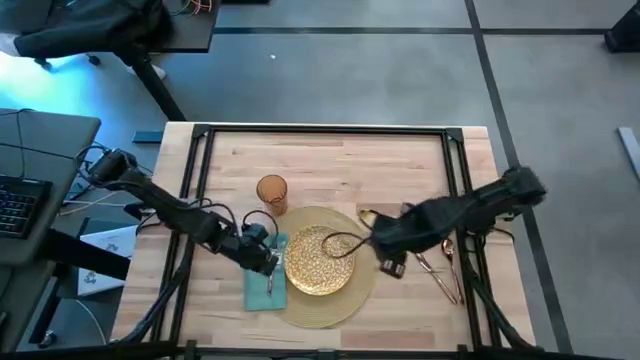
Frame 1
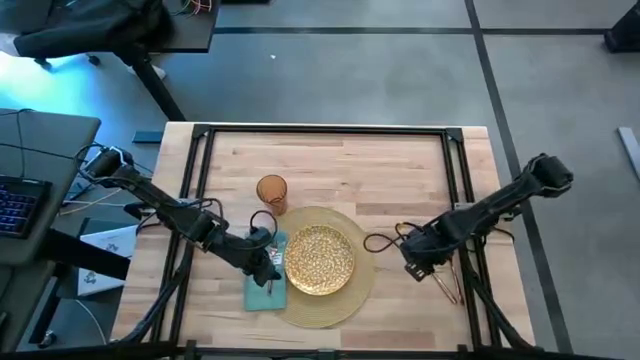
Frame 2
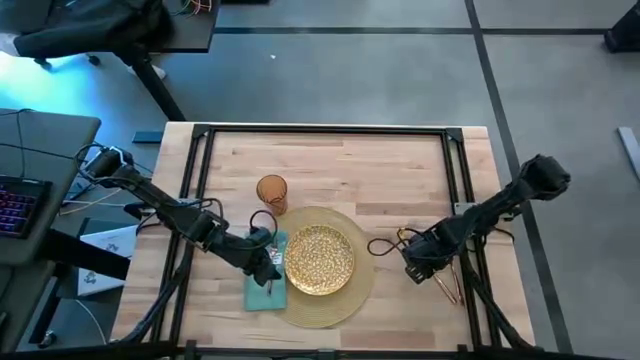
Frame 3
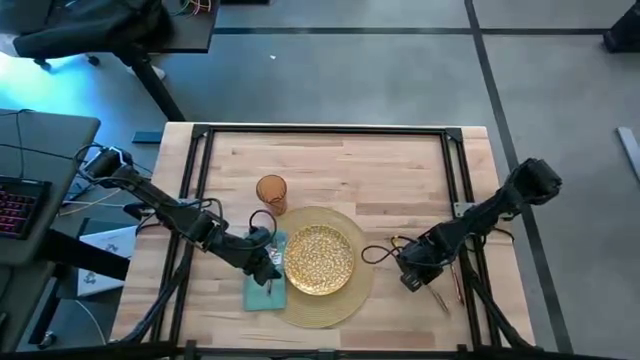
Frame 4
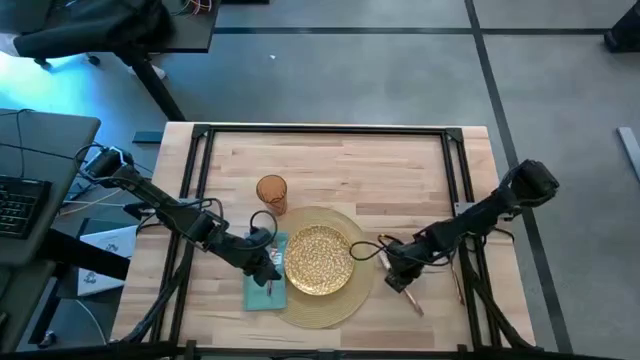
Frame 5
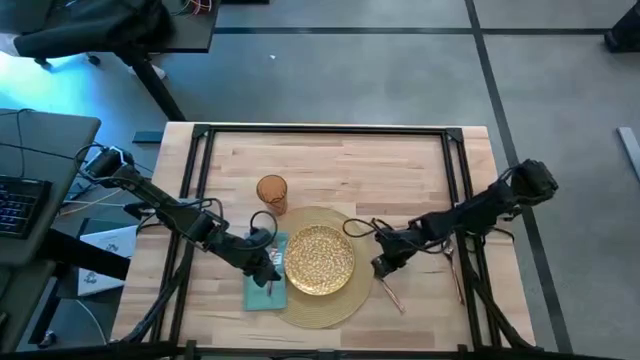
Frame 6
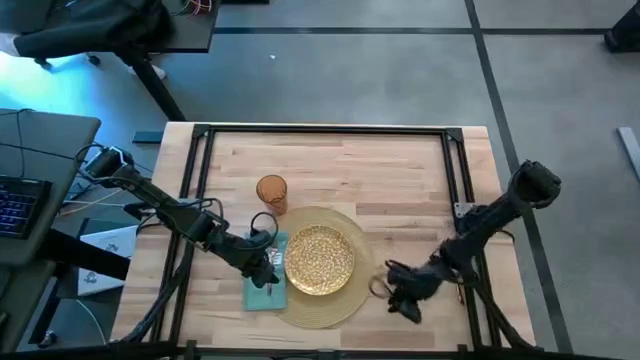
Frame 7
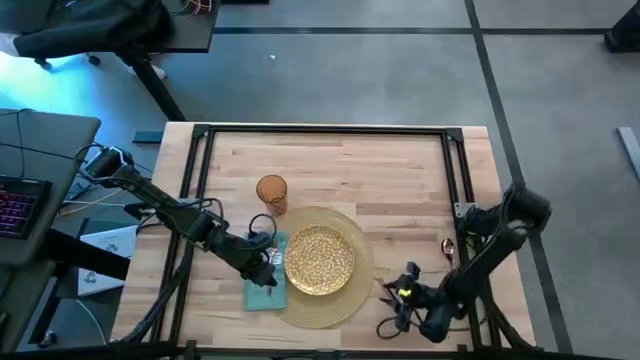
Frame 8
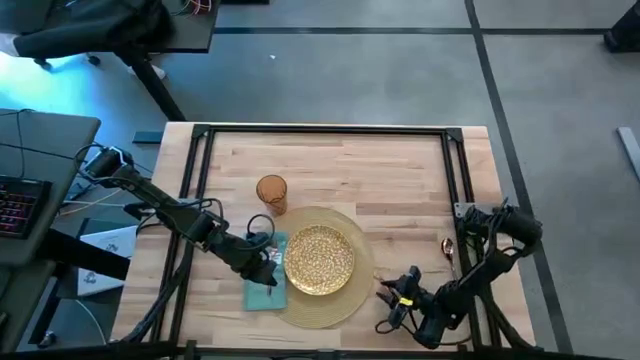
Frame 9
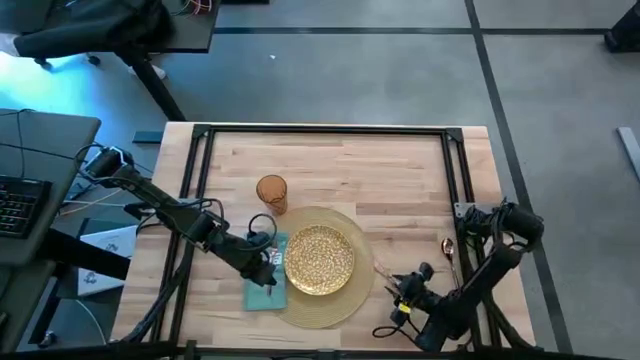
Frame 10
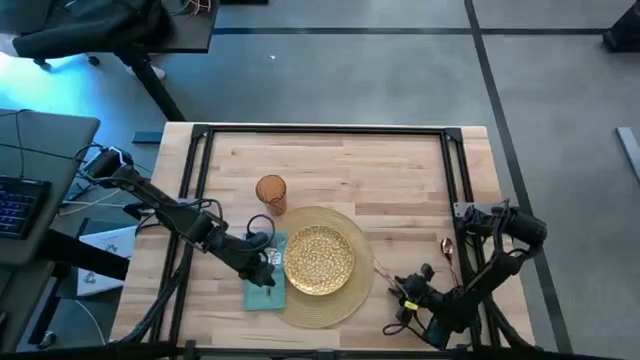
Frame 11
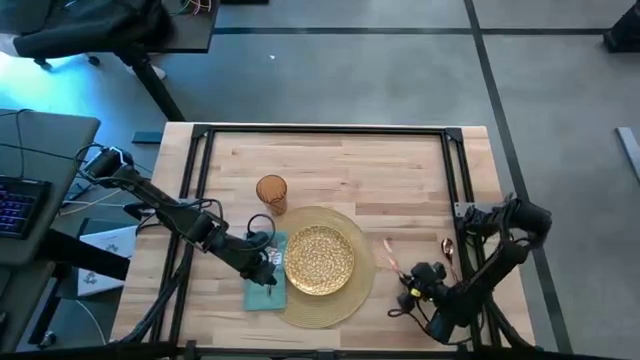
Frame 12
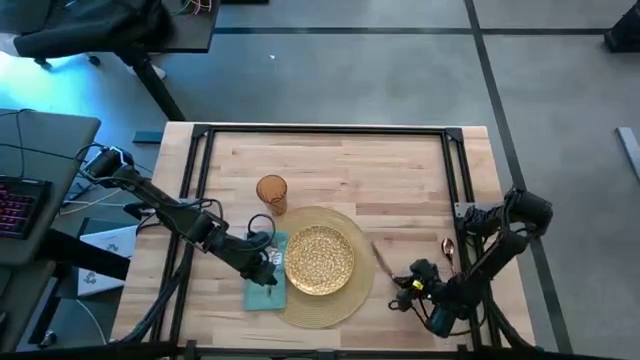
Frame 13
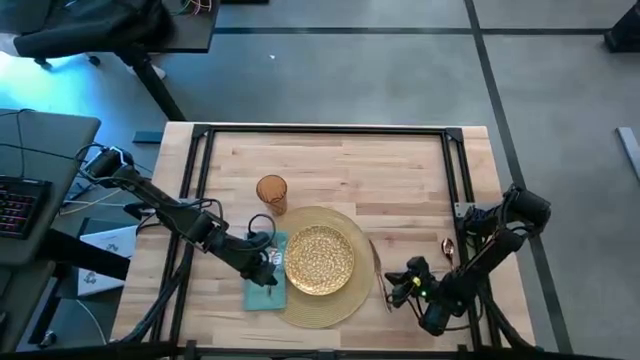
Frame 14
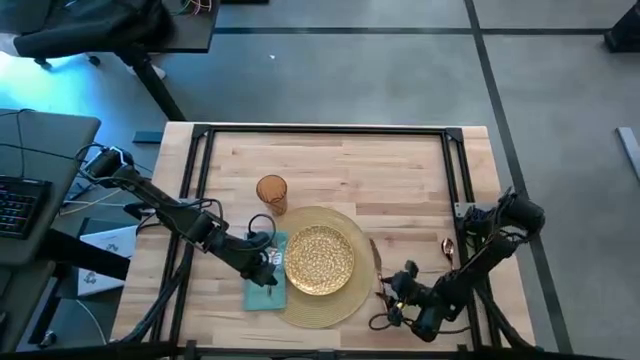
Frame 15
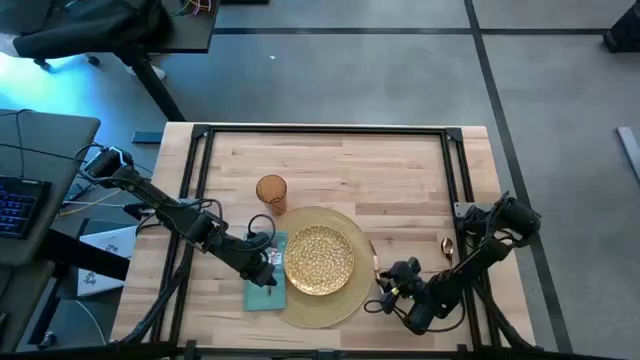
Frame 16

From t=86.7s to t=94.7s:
Task: Set table place
Put the knife to the right of the yellow patterned plate on the mat

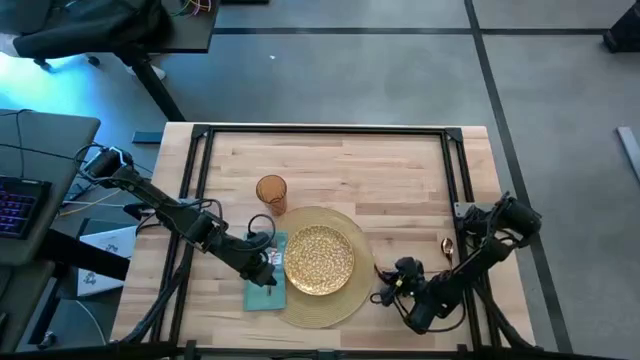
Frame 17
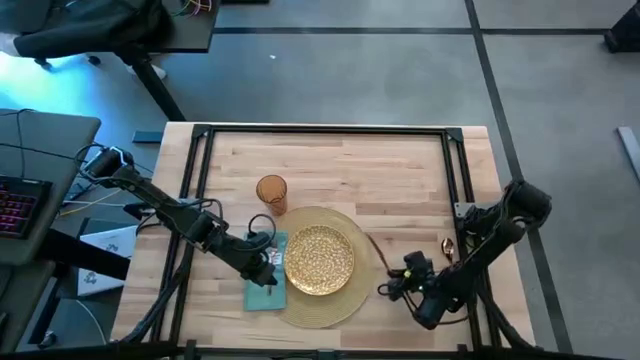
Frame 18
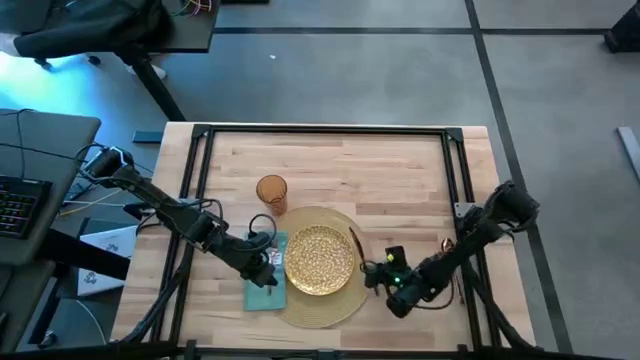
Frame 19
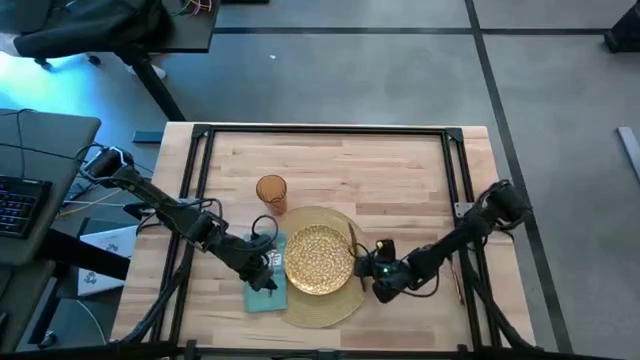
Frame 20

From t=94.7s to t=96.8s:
Put the knife to the right of the yellow patterned plate on the mat

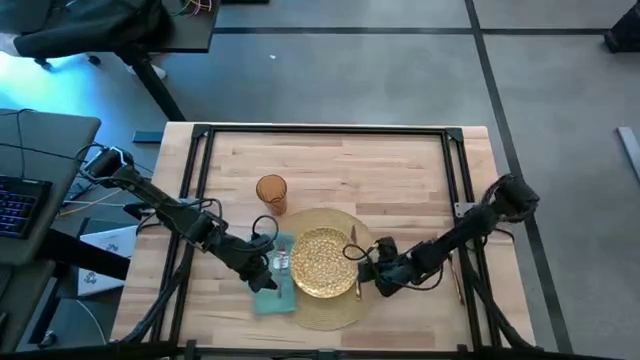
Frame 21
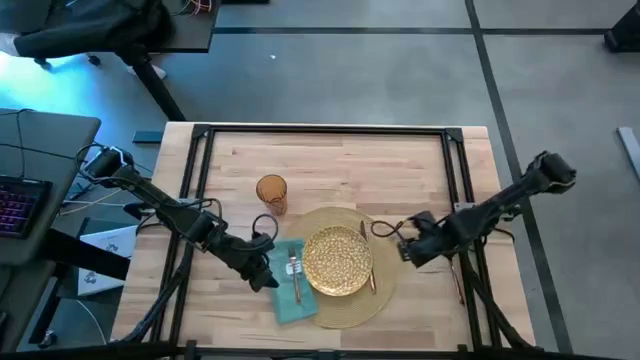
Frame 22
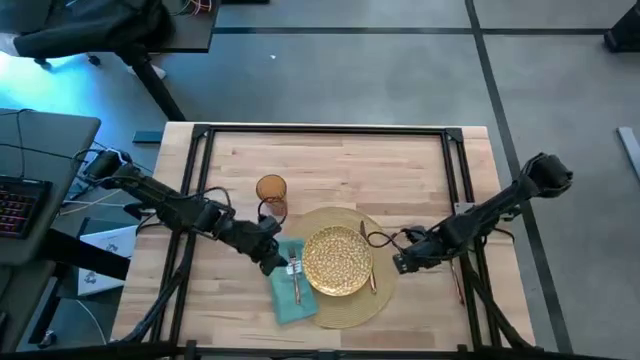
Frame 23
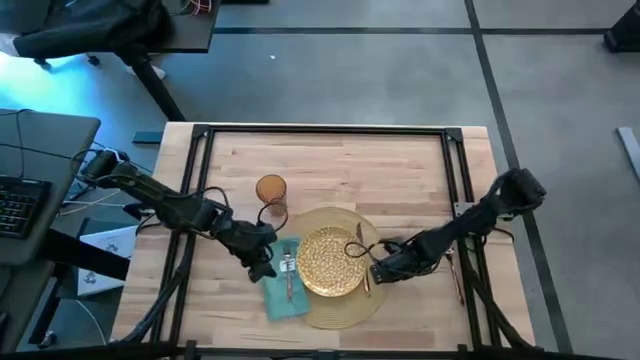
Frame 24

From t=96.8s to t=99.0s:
Adjust the mat

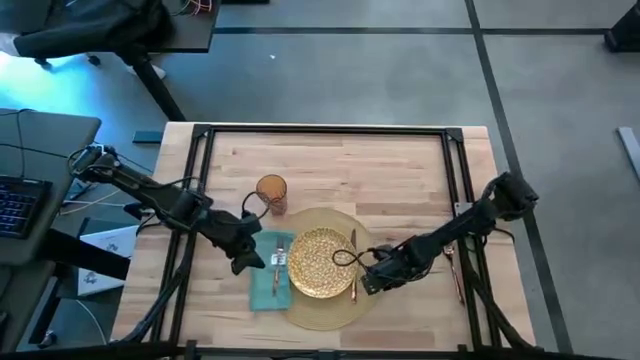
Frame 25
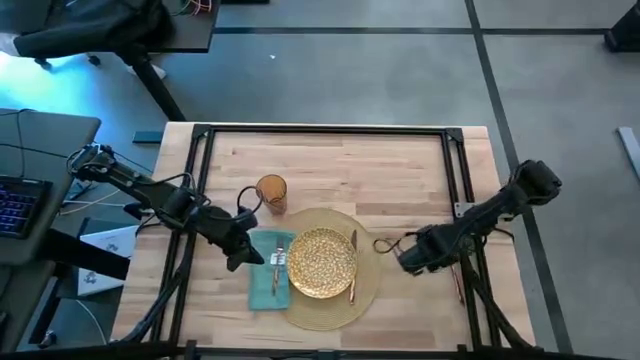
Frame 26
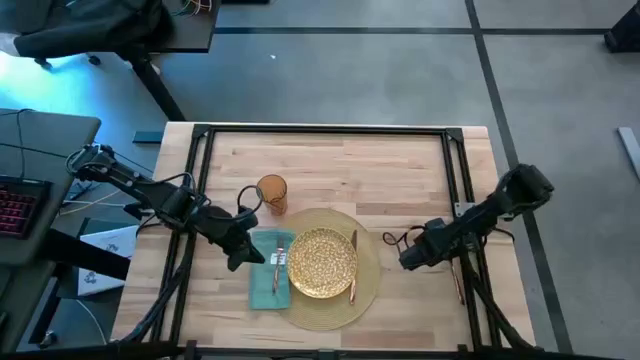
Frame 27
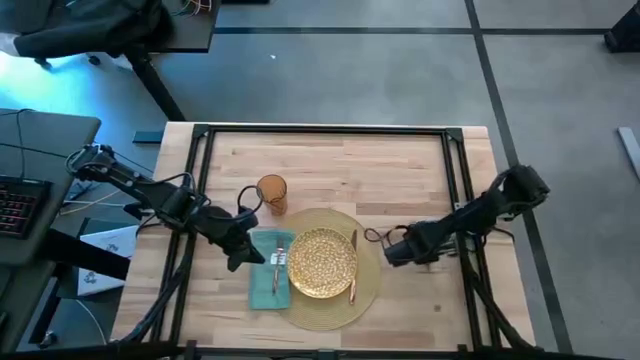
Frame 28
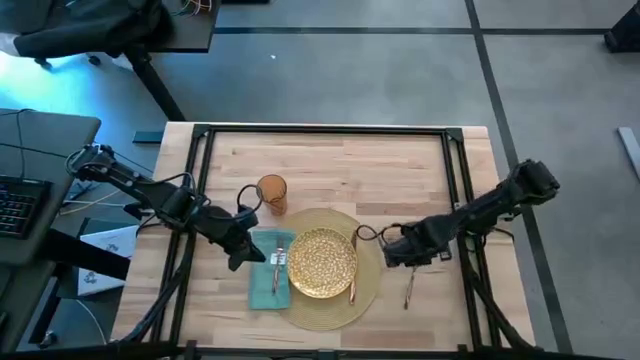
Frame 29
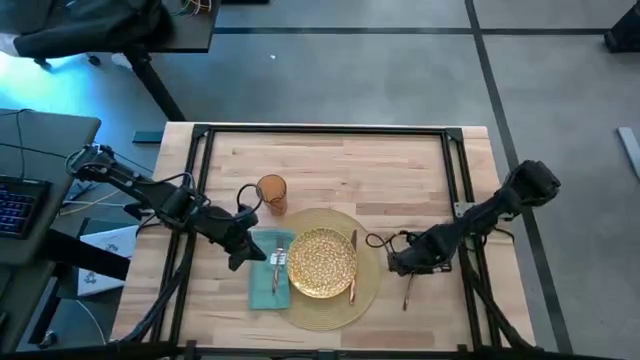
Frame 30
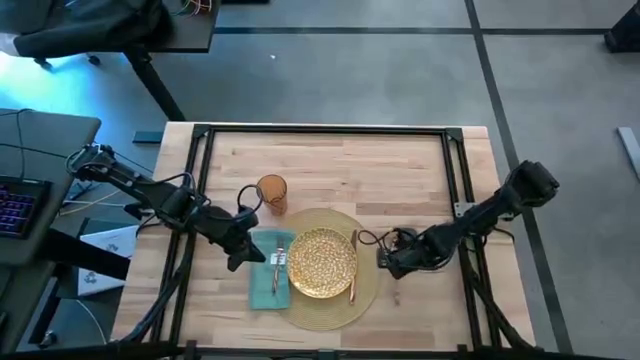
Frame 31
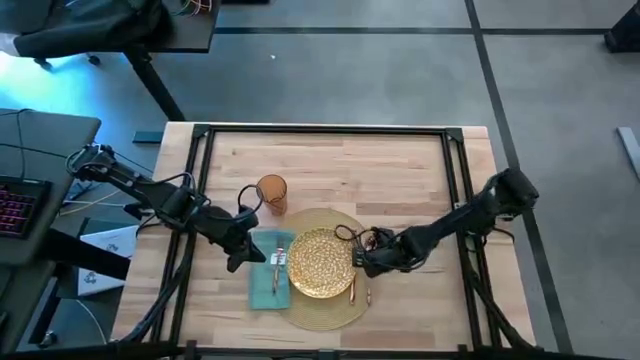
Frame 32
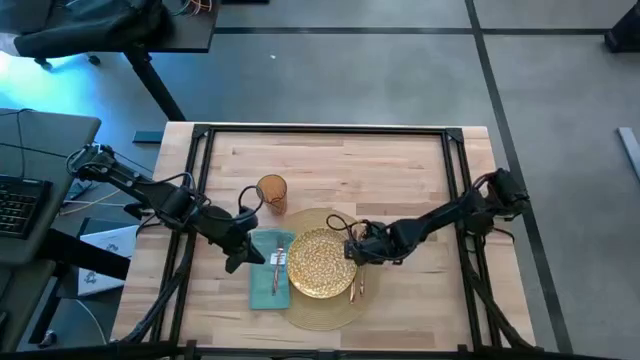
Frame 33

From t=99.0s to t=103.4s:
Put the spoon to the right of the knife on the mat

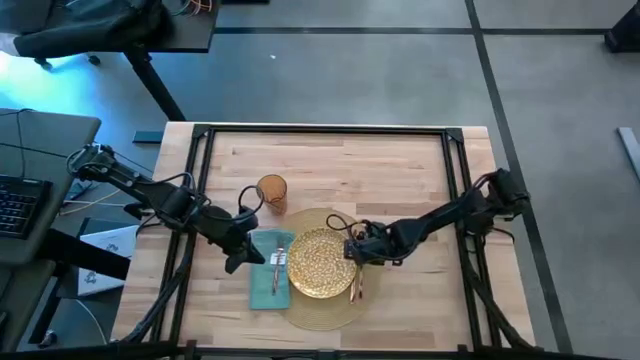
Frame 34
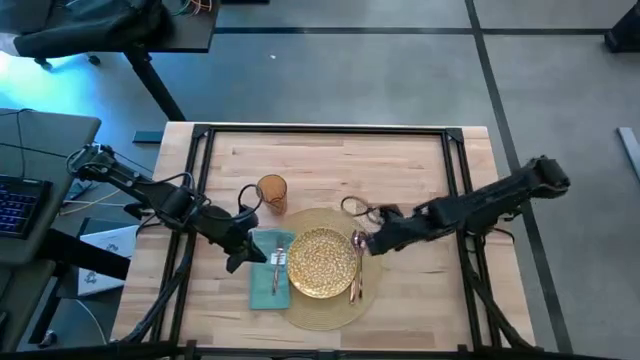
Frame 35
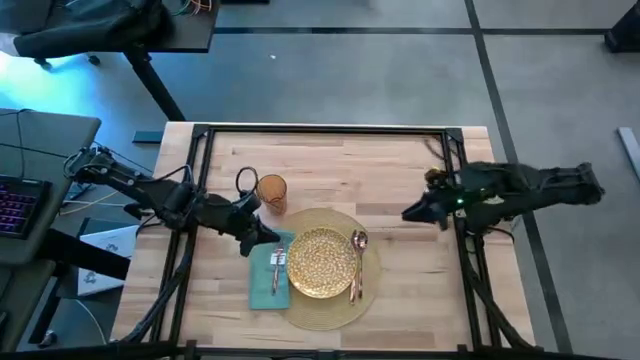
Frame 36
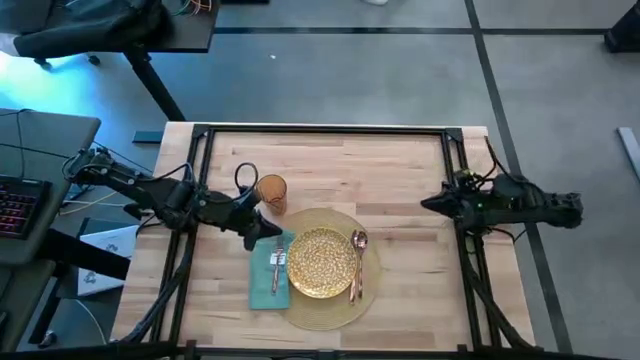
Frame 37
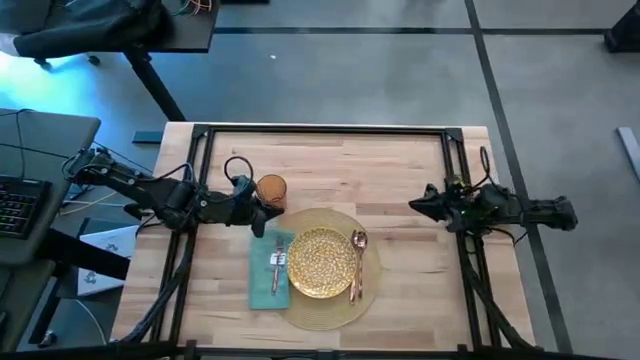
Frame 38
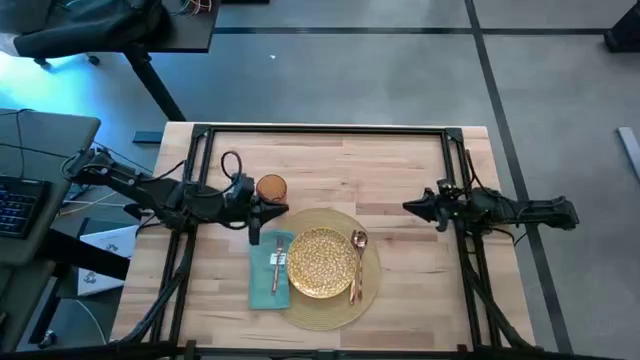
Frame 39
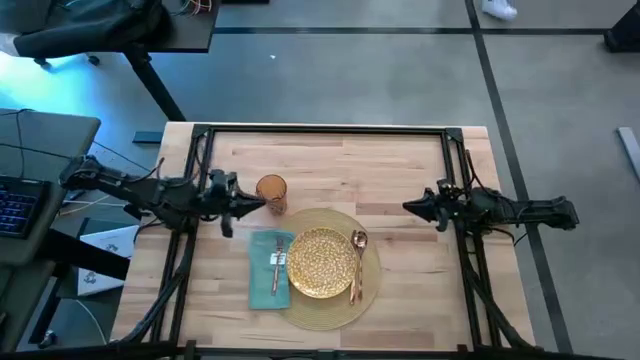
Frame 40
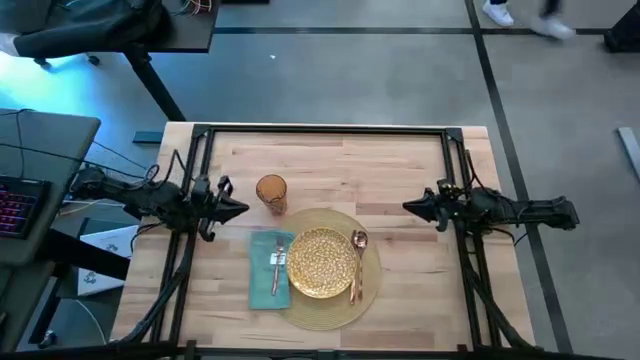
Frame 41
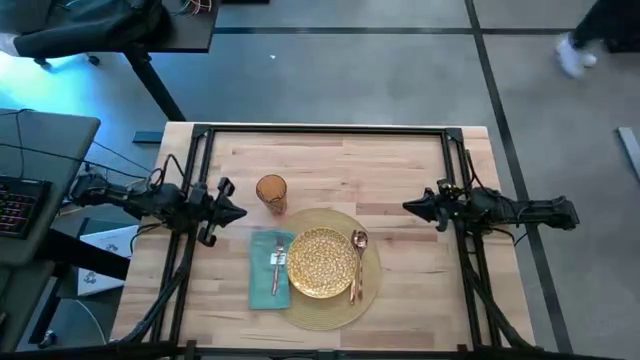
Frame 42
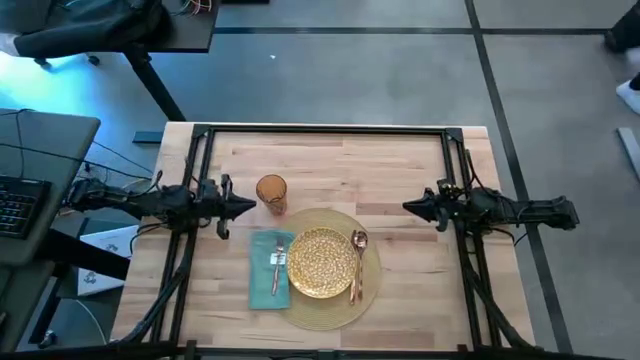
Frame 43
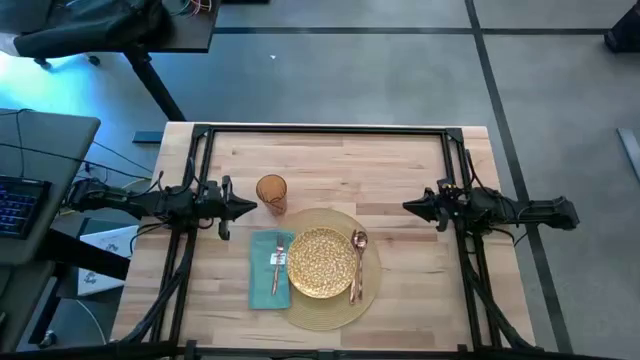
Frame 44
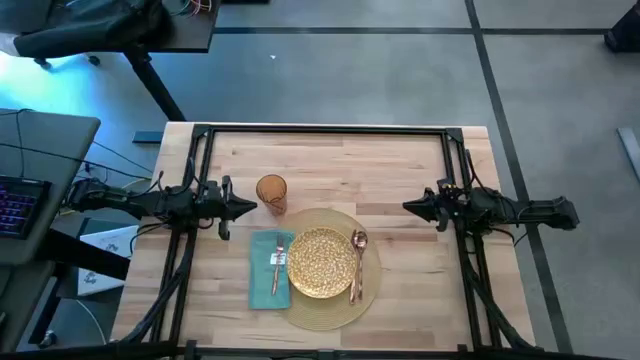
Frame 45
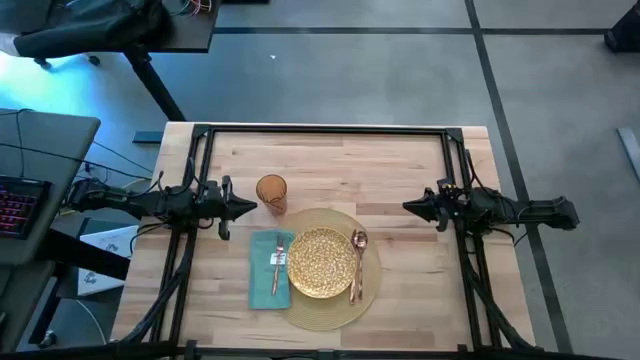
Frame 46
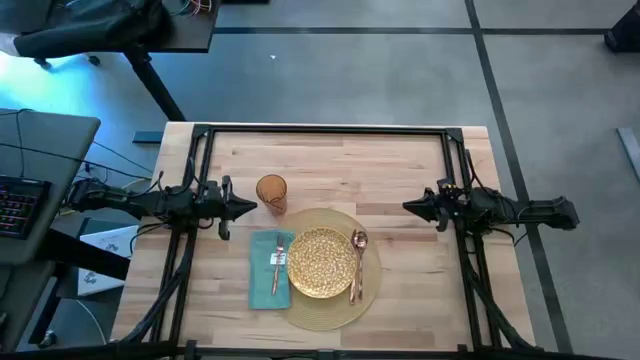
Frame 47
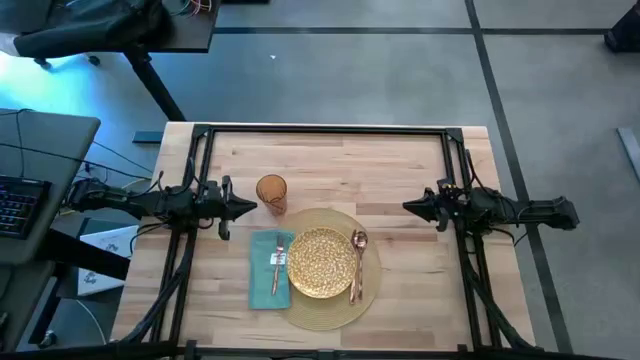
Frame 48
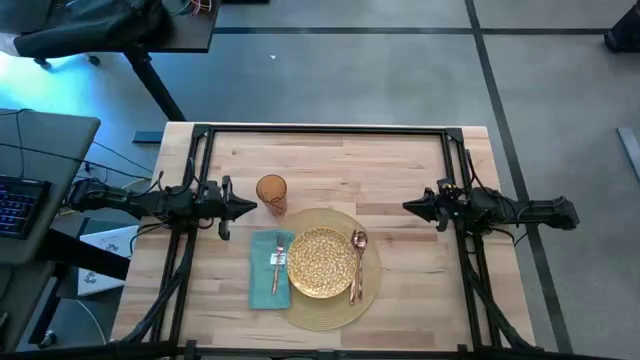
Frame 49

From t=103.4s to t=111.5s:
Return to Home Position
